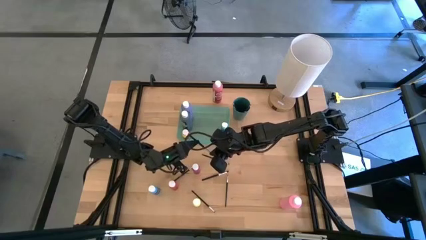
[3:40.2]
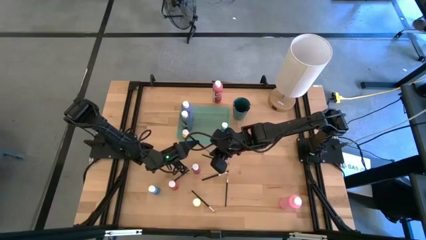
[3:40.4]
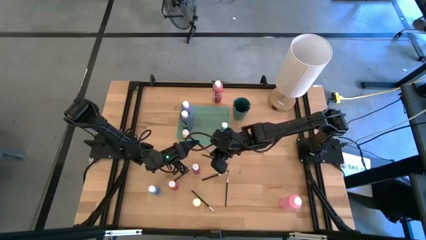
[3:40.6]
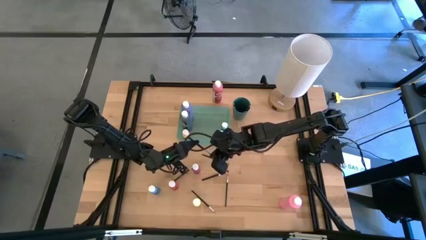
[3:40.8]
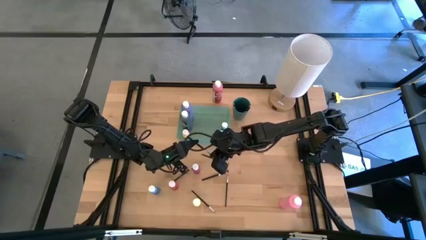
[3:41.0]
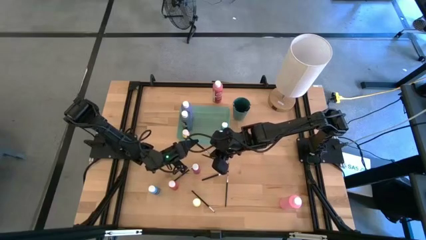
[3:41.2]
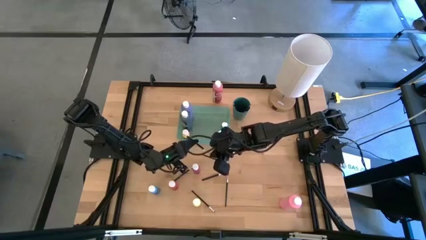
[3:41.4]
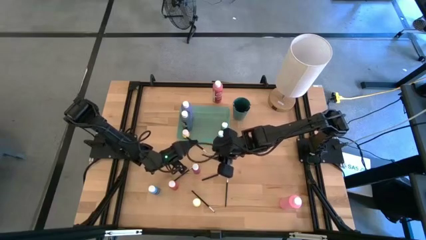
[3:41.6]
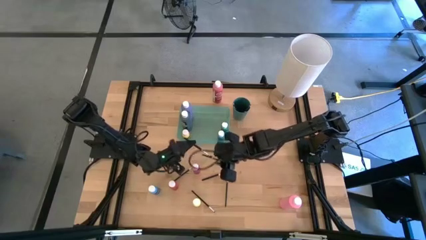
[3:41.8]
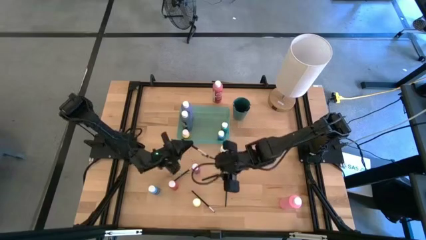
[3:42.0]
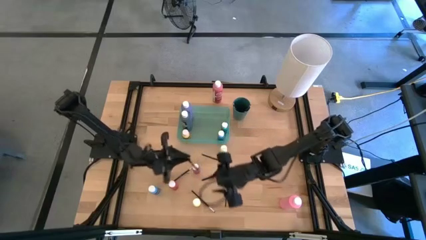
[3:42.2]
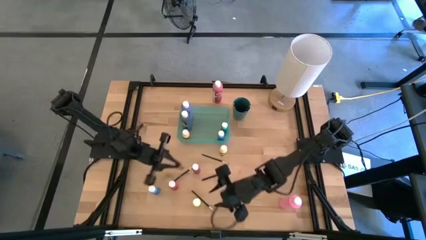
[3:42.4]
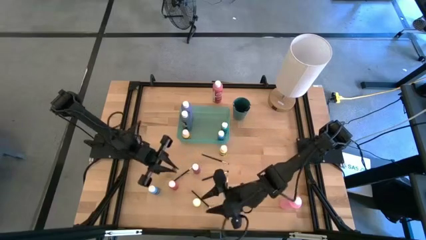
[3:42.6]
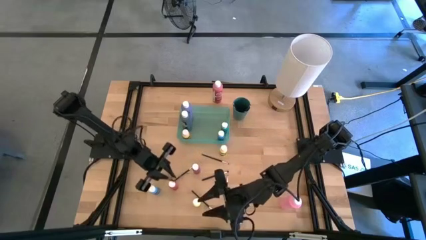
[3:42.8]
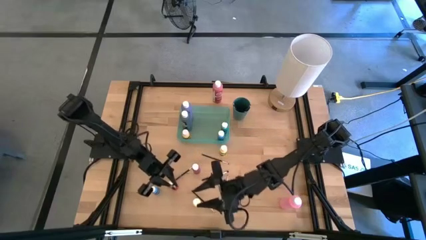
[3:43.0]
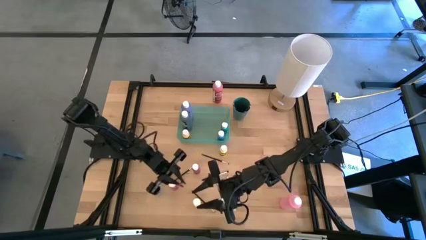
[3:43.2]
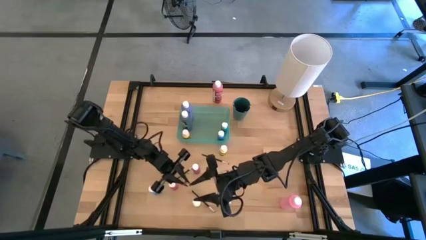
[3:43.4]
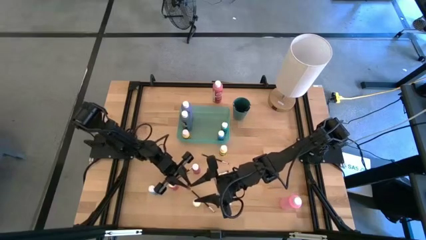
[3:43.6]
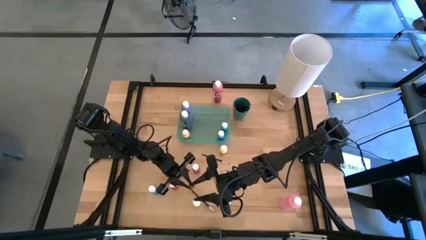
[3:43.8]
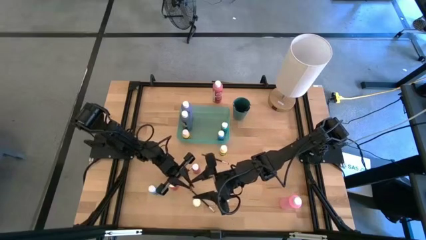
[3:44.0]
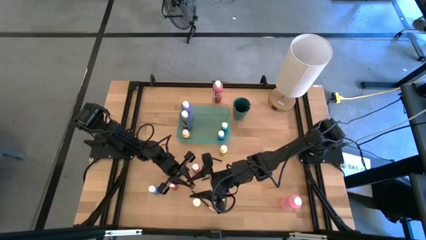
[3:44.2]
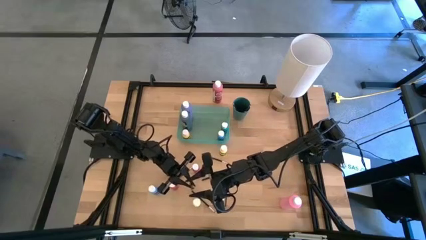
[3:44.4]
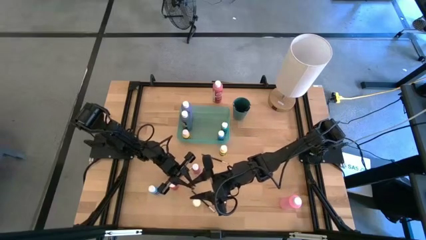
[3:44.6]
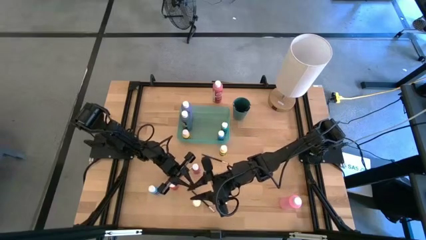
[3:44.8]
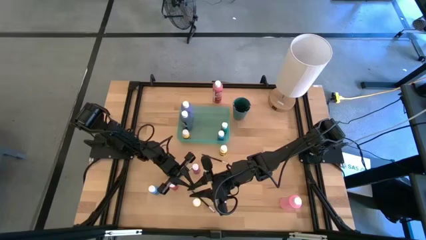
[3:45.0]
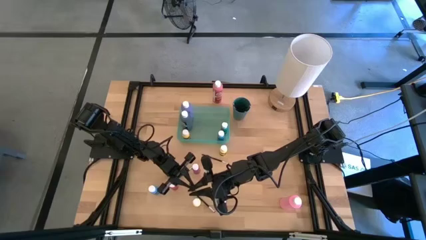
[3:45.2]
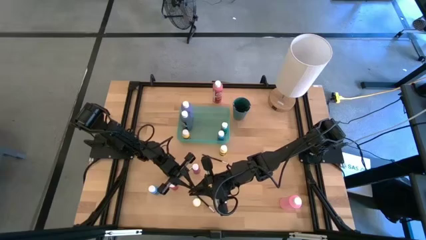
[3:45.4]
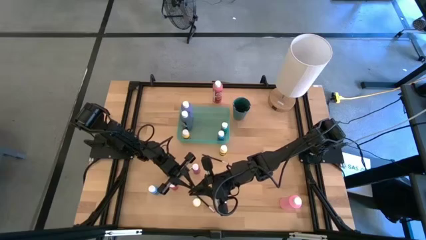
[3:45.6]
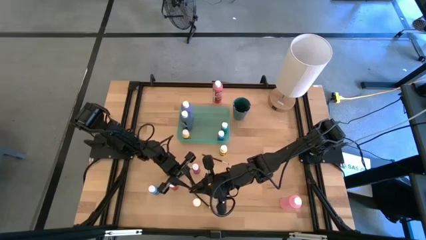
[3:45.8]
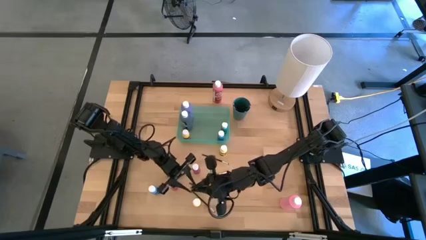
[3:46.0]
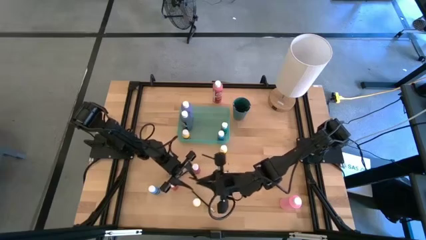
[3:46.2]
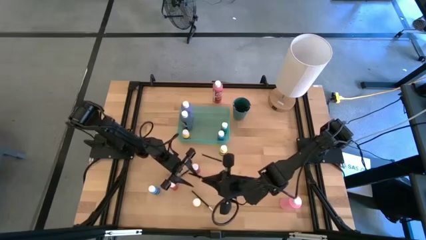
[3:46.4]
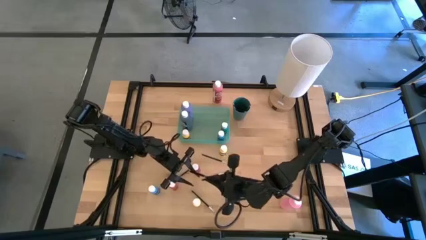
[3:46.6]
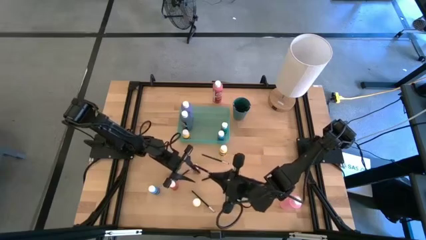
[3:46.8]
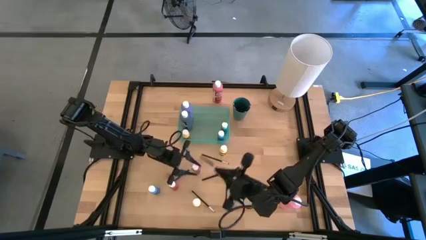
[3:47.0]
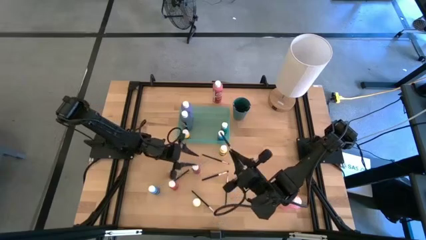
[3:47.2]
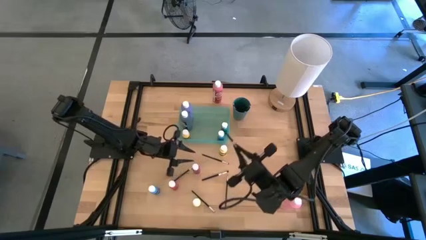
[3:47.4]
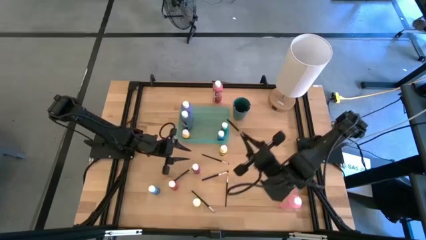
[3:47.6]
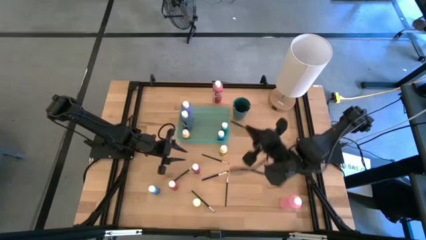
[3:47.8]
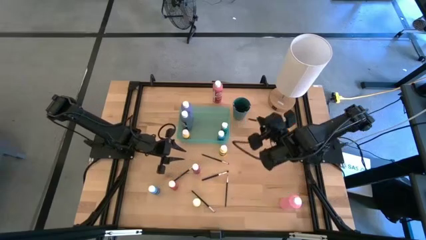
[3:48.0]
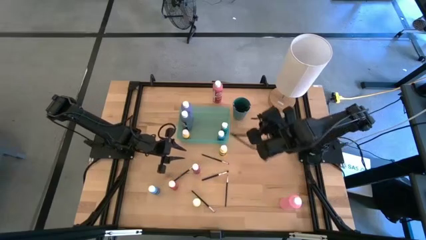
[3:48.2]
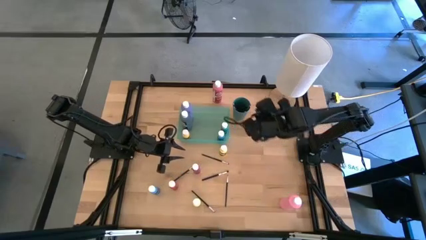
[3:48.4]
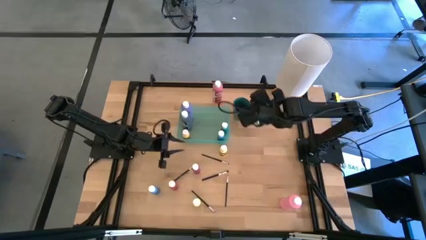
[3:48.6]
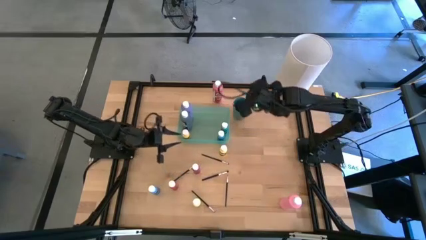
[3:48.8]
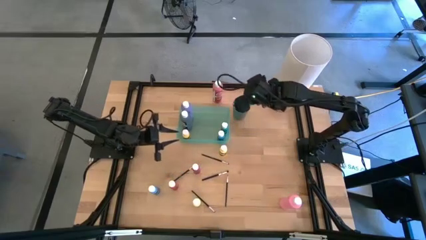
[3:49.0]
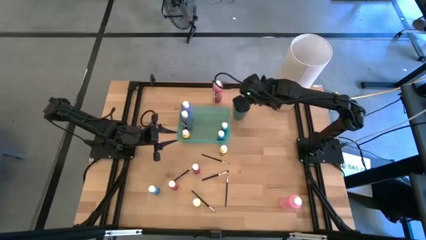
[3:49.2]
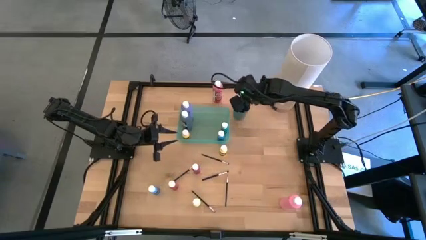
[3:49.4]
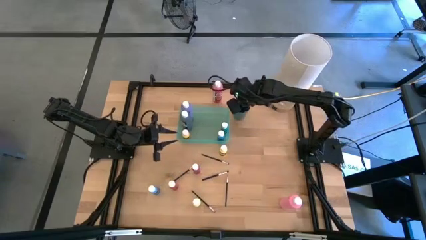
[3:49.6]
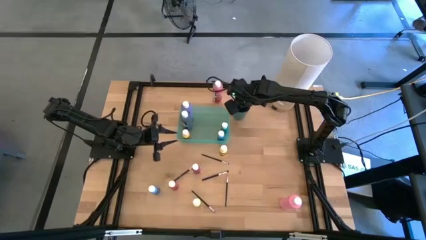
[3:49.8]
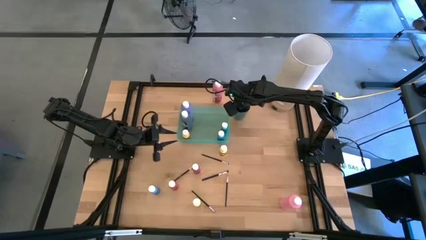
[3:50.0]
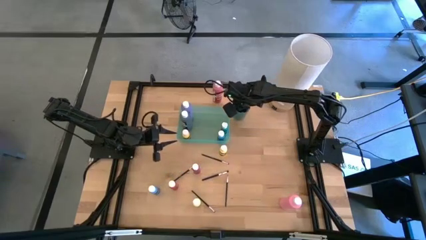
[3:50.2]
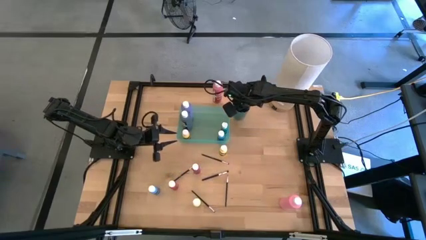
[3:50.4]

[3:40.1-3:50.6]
Task: Pick & Place Paint Supplies
Put the black paint brush into the dark green cup
